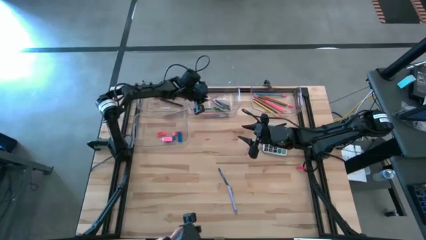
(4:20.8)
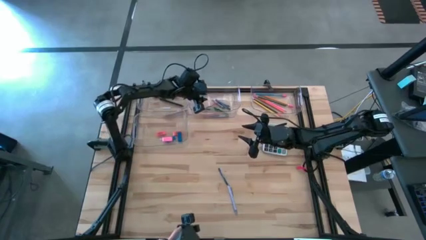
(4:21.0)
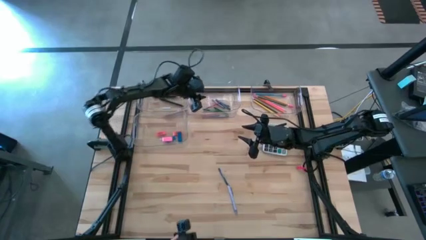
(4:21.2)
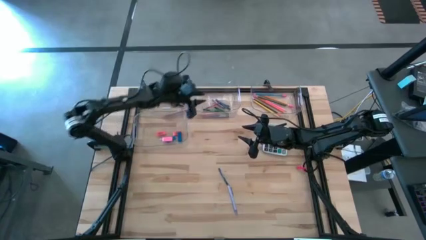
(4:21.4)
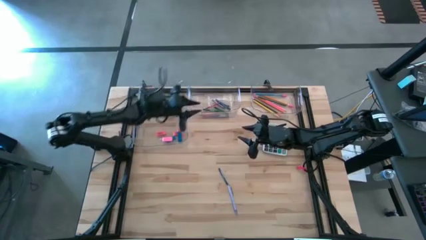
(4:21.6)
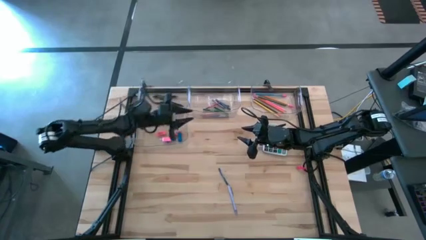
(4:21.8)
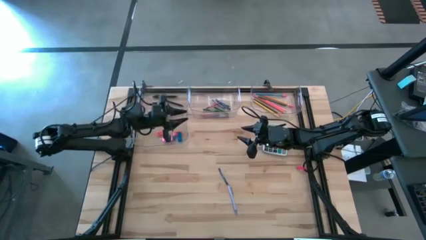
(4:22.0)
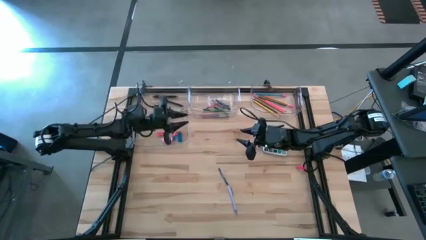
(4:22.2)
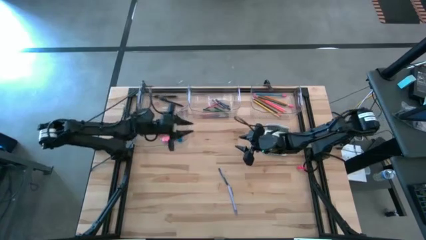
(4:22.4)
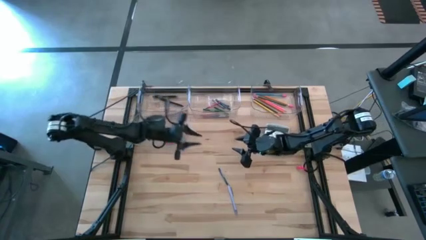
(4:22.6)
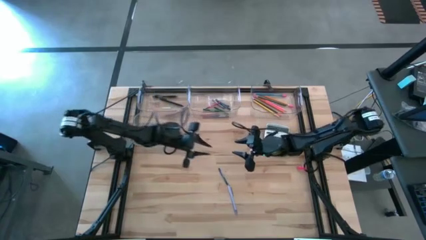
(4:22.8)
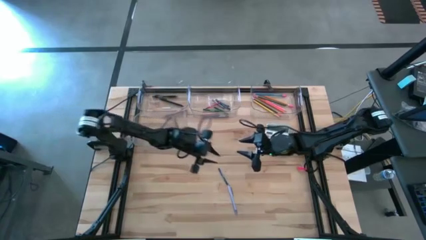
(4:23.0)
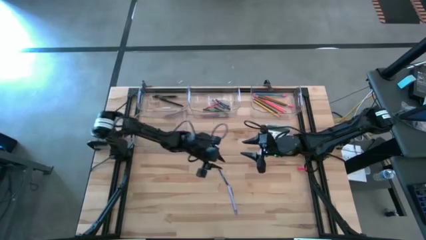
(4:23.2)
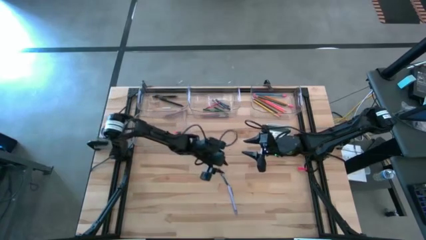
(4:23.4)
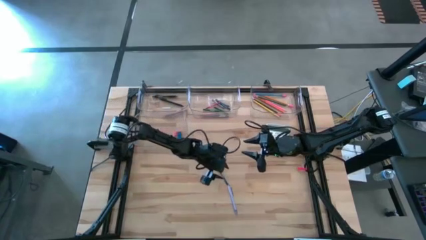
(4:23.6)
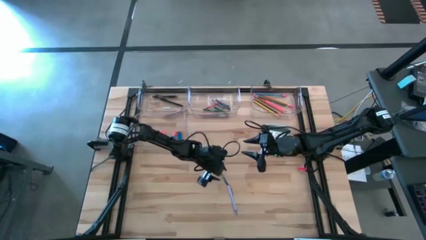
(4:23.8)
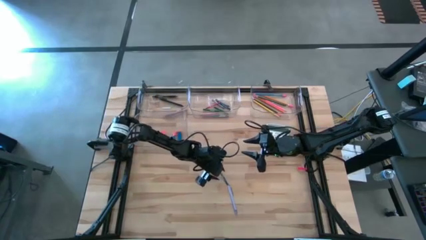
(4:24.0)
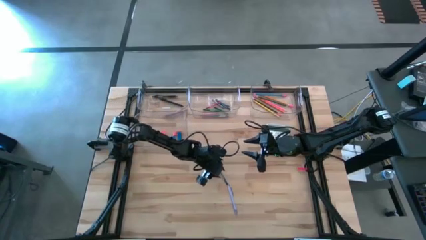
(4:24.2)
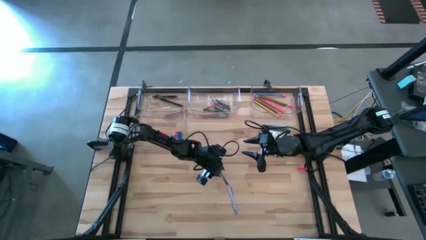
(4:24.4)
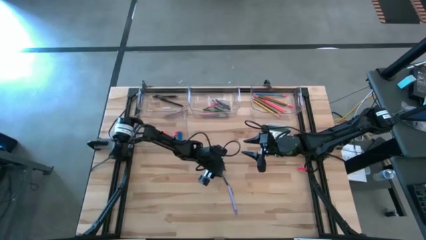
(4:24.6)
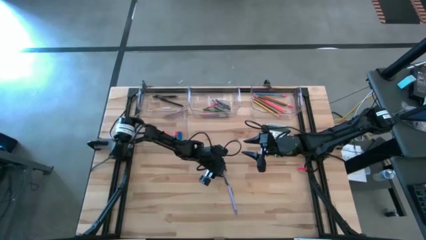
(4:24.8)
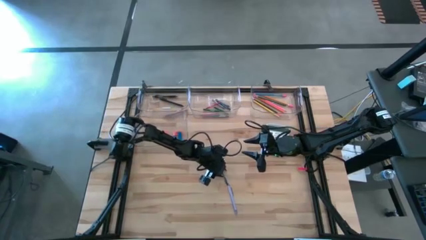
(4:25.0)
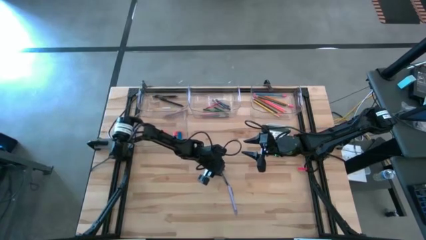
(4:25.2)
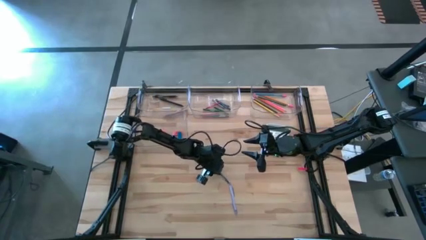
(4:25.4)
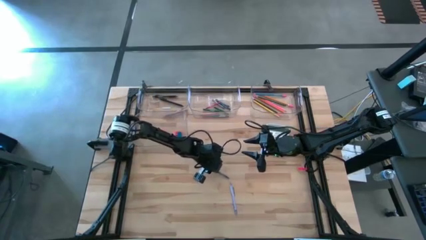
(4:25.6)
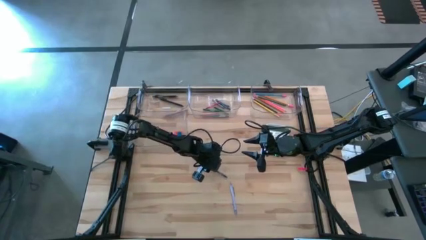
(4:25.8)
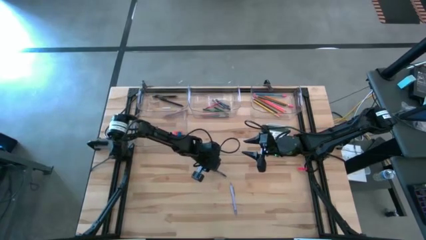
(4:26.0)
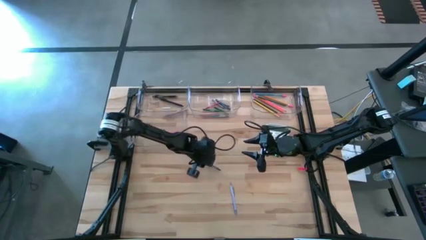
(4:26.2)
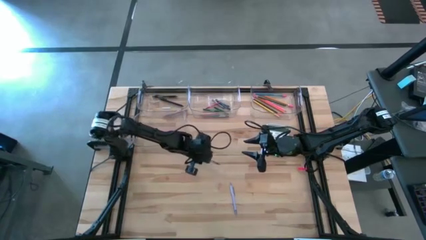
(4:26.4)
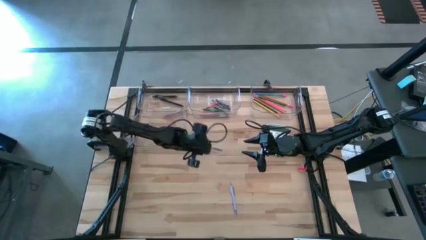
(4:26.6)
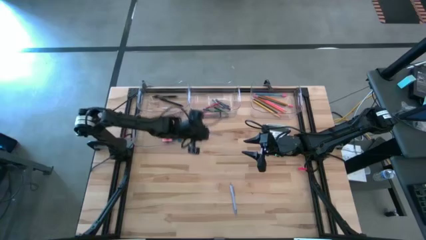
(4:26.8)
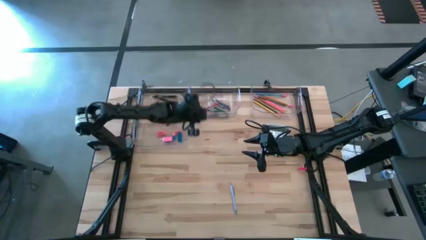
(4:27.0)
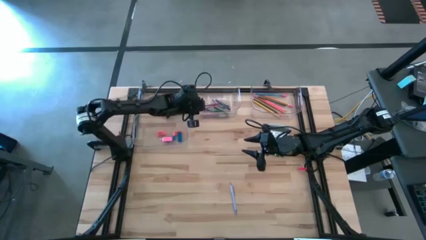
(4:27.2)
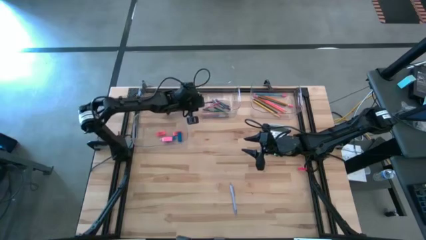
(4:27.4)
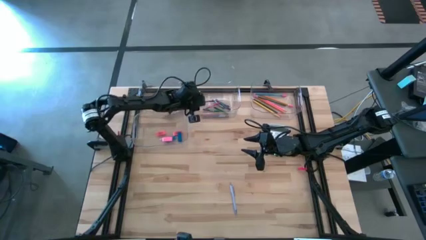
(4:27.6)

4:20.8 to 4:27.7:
Task: Sort crayons/erasers/pens/pencils in bins
Put the blue crayon into the top center transparent bin

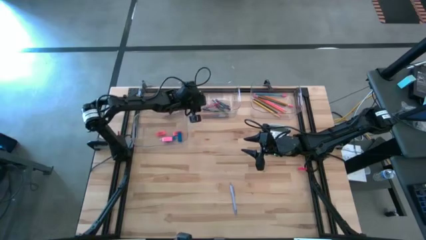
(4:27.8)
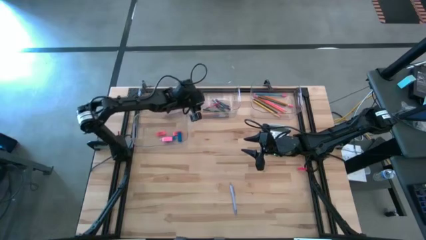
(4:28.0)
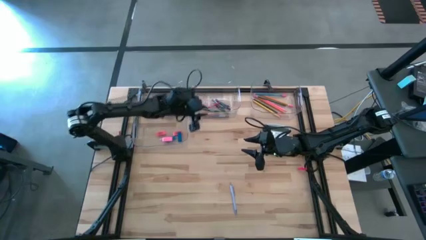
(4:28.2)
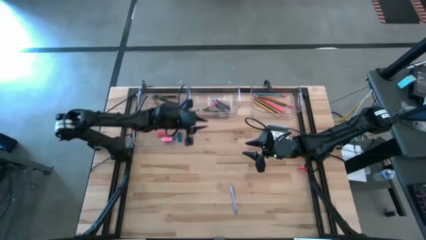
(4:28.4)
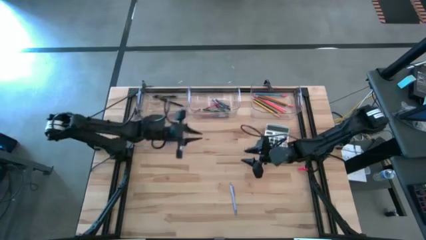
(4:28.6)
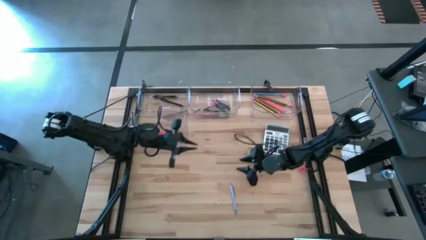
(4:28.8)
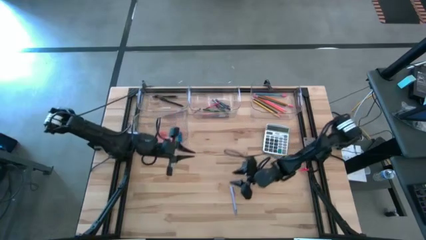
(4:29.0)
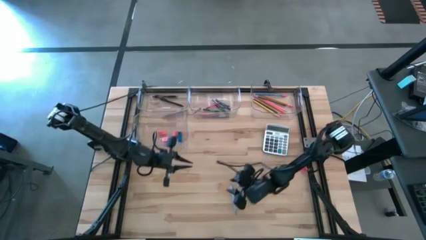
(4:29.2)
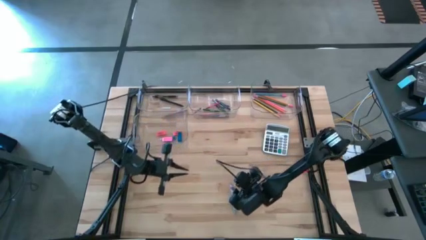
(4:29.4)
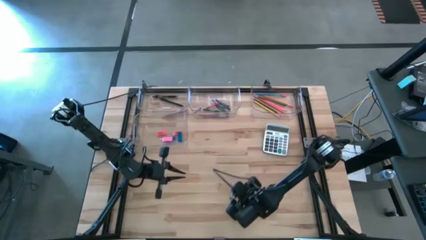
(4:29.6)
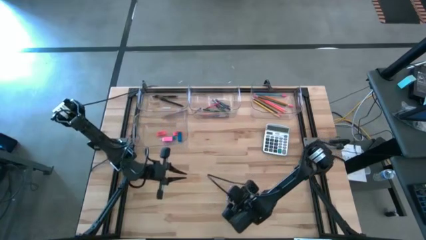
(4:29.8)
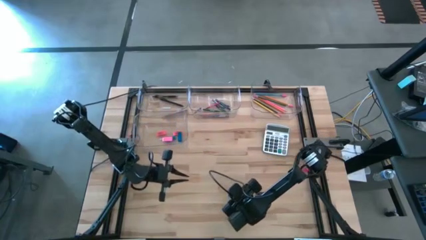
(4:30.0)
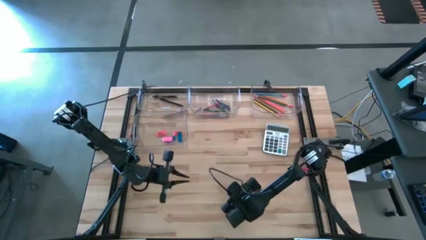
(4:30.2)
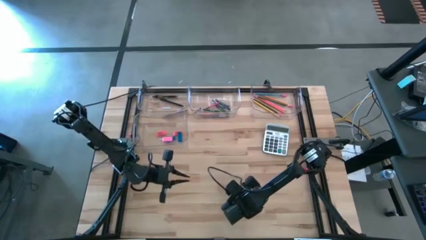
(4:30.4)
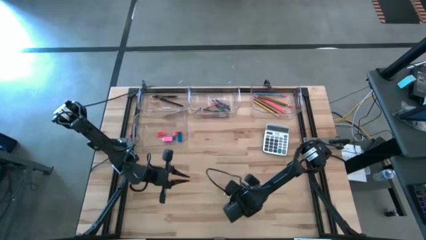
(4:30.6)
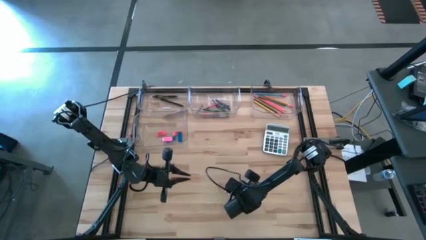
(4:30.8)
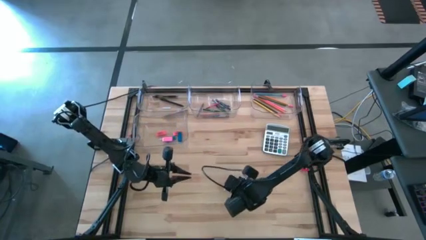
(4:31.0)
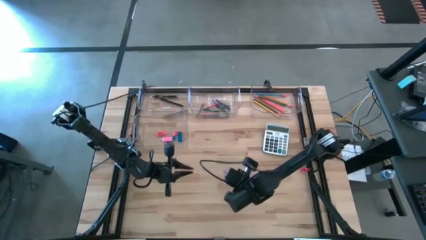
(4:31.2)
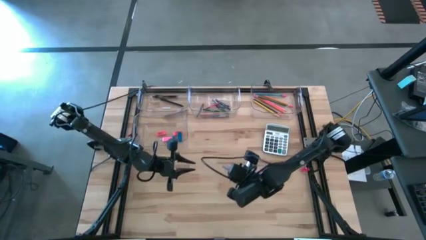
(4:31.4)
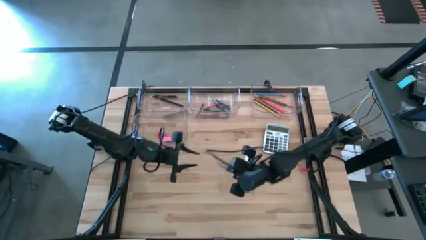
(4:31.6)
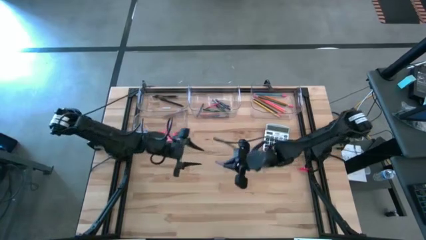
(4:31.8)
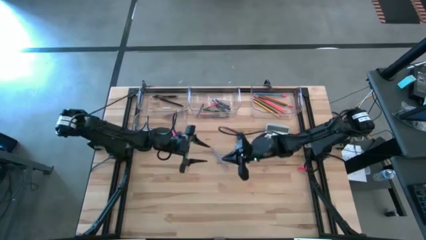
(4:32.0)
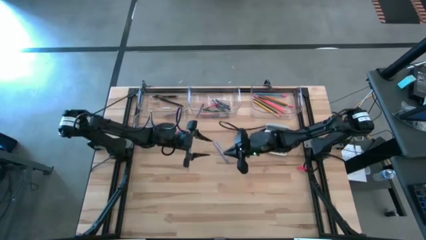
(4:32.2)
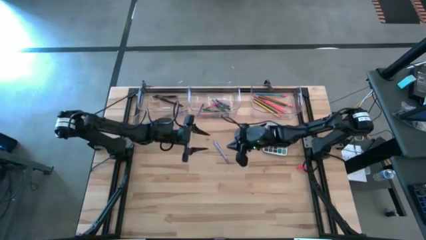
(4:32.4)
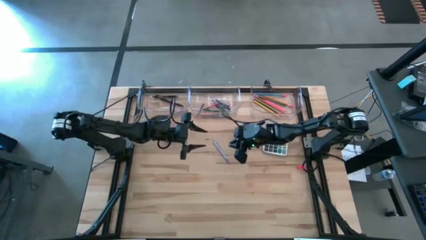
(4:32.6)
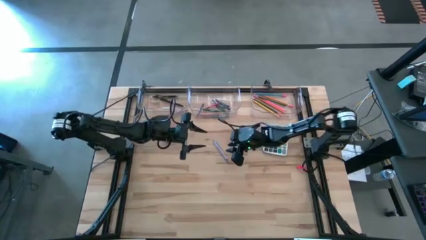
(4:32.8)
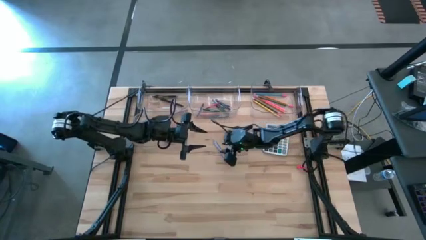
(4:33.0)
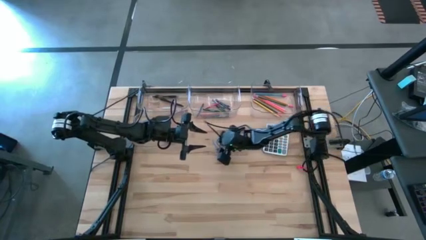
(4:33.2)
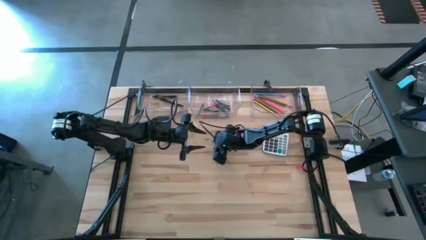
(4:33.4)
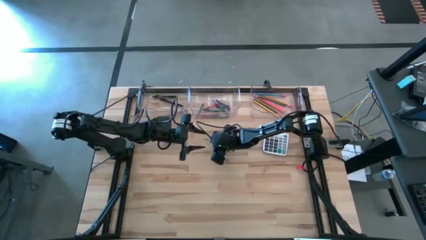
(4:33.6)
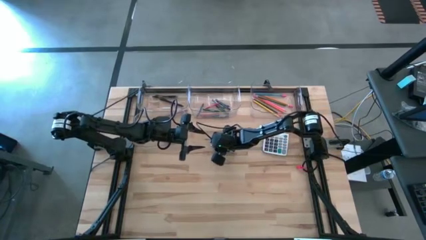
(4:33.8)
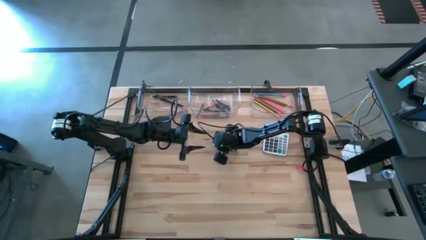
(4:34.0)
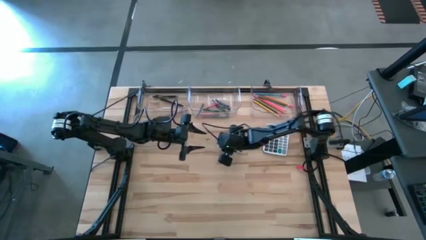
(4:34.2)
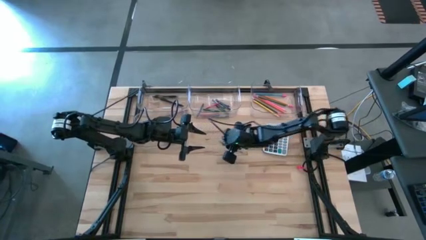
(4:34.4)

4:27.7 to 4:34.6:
Put the gray pen into the top left transparent bin

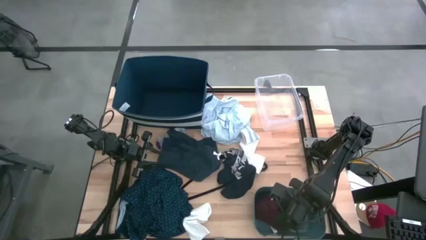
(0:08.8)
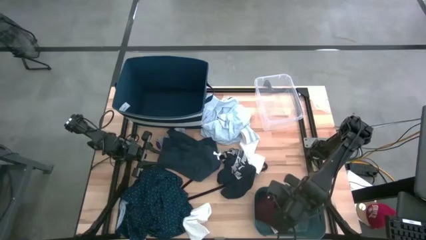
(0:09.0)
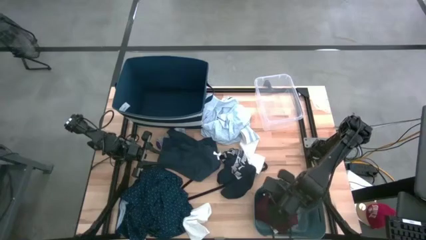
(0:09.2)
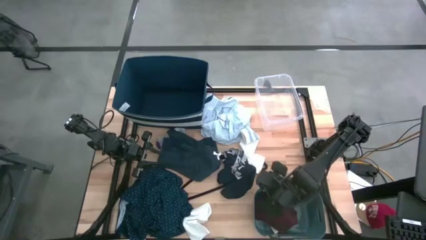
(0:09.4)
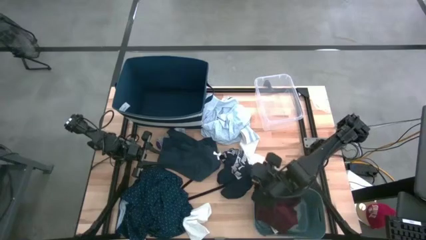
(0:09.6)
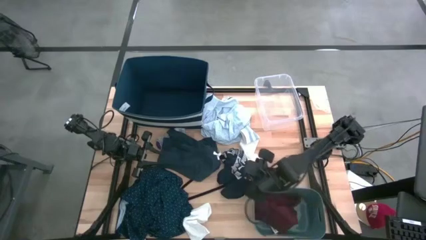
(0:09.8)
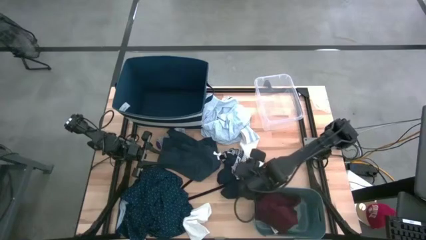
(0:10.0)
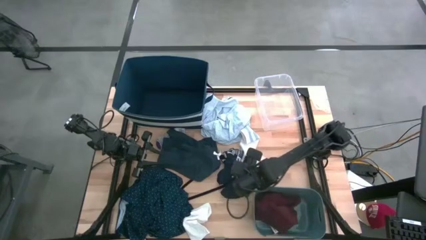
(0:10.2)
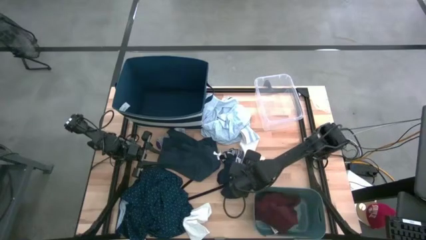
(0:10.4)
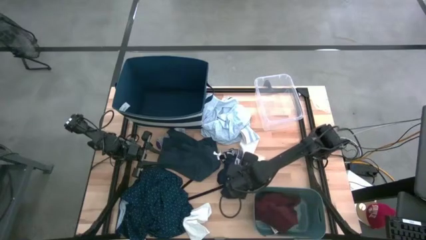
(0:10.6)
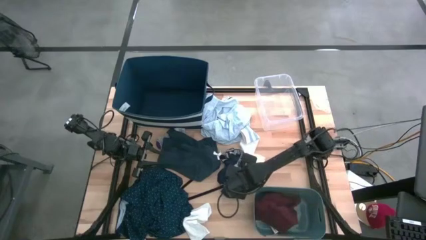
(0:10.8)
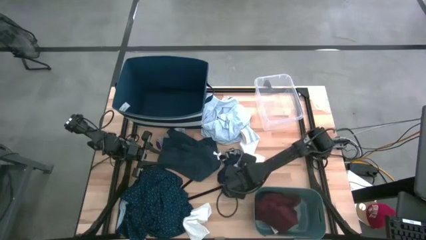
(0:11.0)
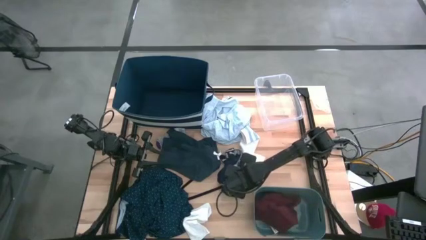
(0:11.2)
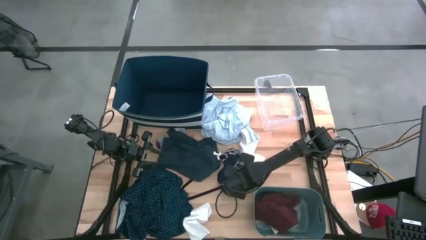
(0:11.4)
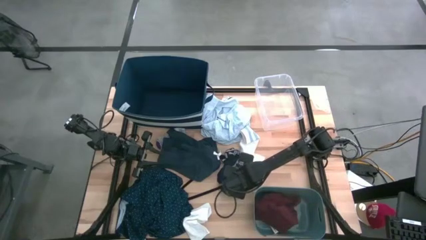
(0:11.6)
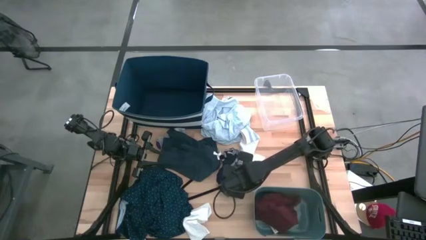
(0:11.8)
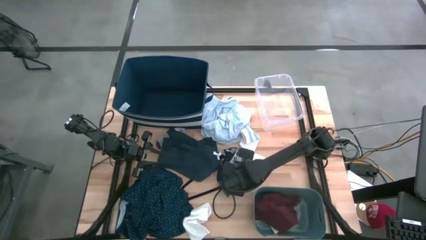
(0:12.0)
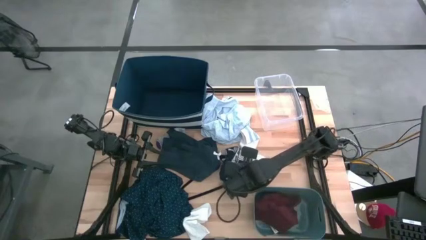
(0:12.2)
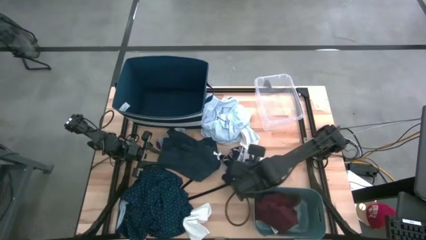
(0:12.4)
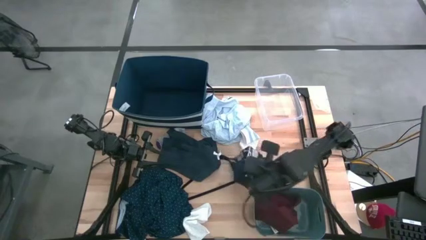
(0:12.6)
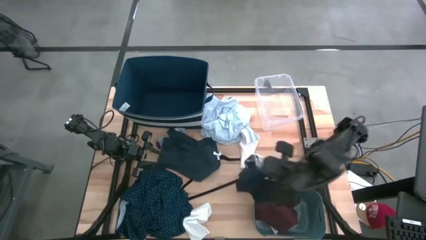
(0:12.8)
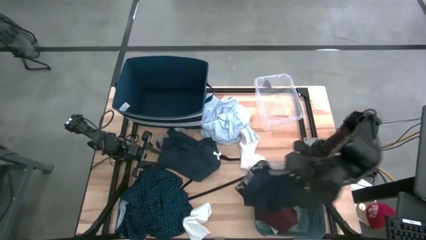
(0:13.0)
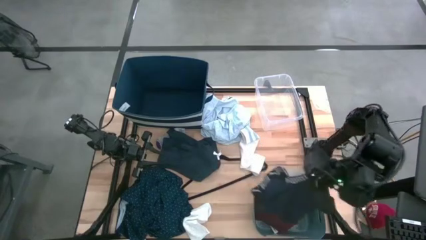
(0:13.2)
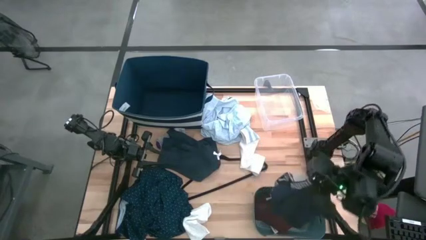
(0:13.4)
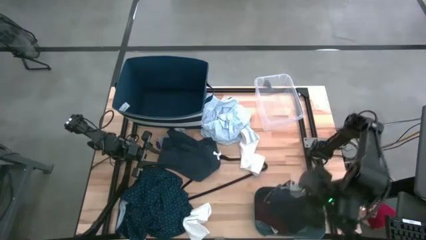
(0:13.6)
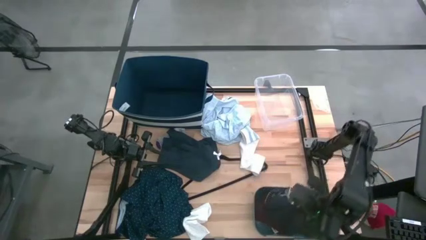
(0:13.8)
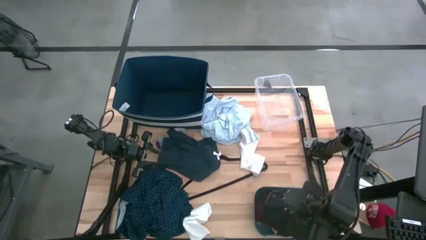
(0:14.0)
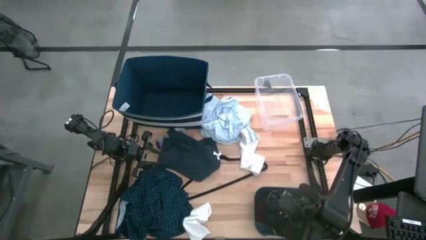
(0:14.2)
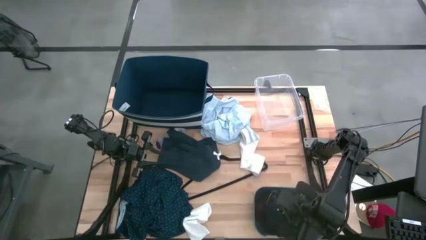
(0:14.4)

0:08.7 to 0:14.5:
Task: Pick & Place Cloths
Put the blue boxer shorts into the green bin
